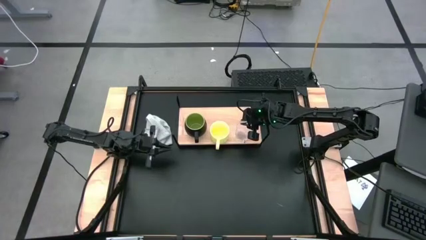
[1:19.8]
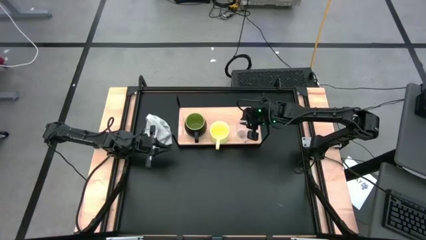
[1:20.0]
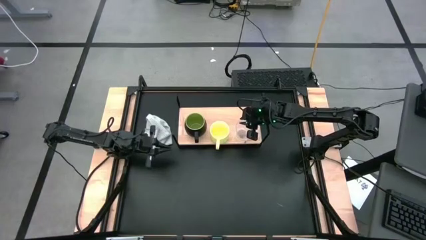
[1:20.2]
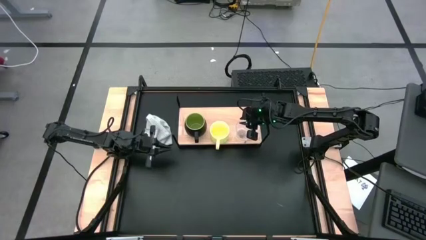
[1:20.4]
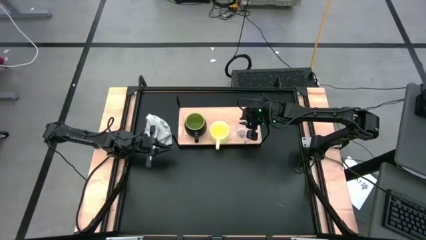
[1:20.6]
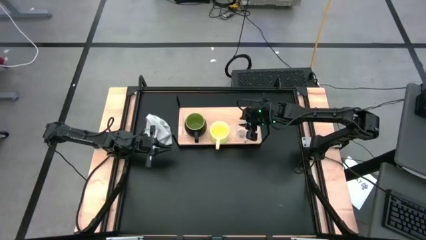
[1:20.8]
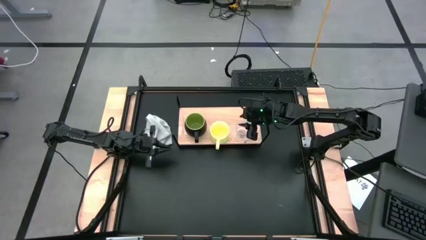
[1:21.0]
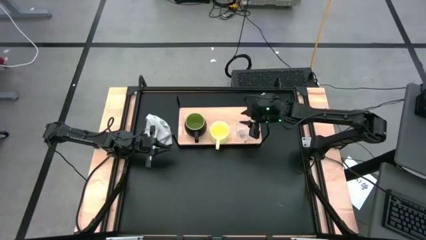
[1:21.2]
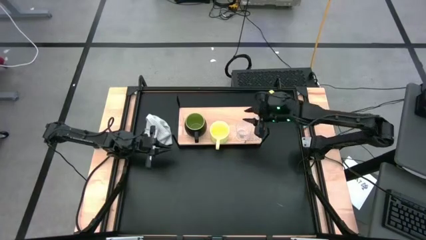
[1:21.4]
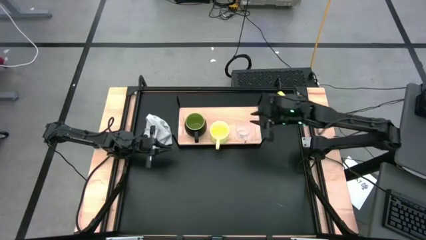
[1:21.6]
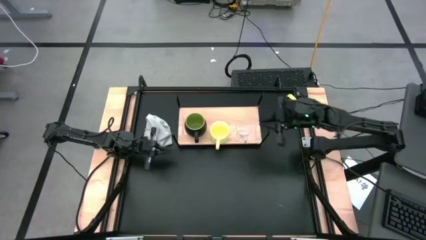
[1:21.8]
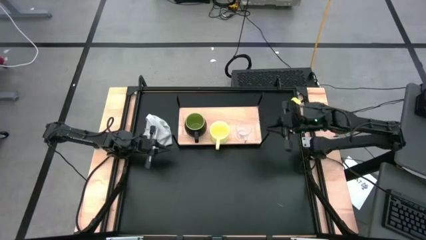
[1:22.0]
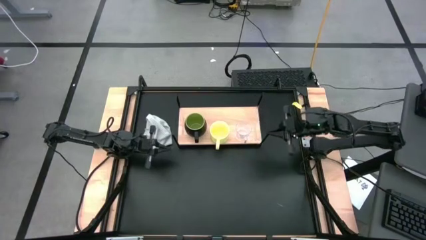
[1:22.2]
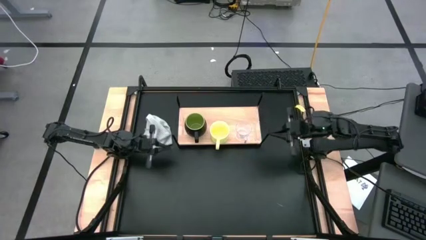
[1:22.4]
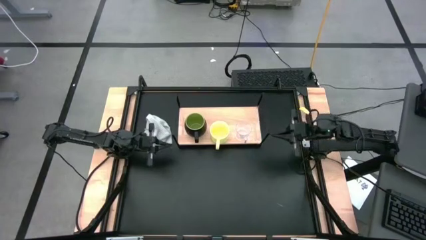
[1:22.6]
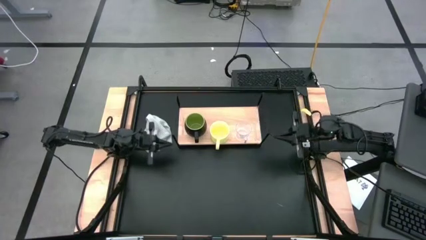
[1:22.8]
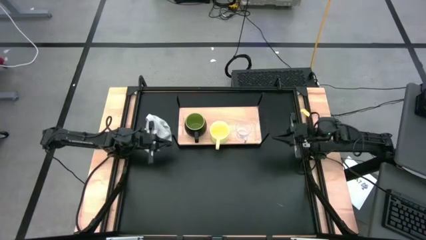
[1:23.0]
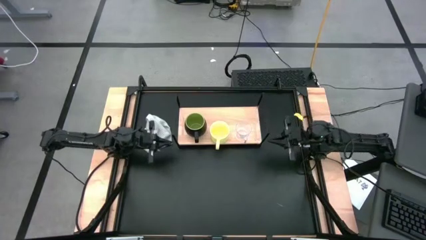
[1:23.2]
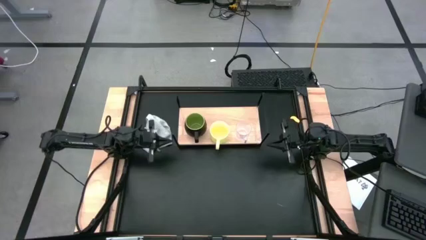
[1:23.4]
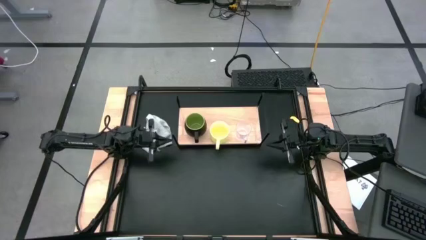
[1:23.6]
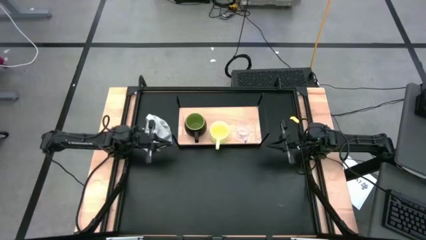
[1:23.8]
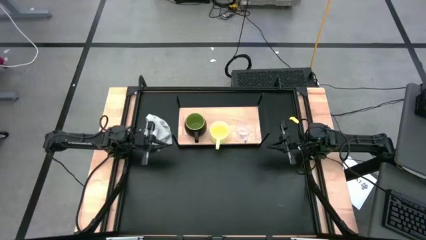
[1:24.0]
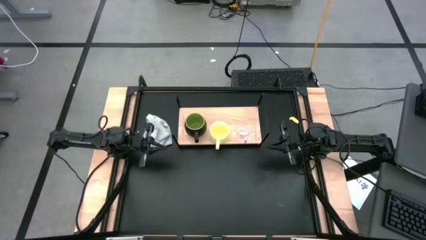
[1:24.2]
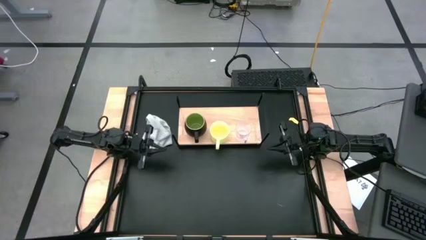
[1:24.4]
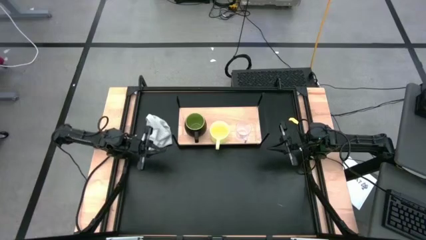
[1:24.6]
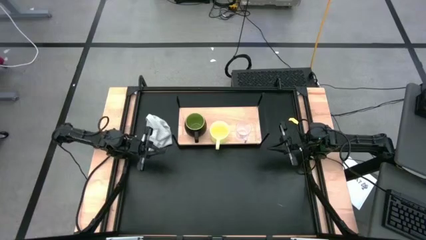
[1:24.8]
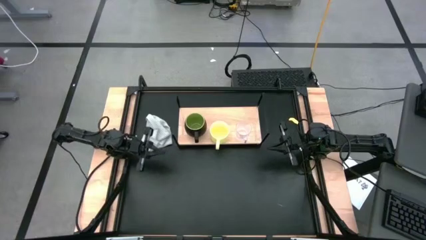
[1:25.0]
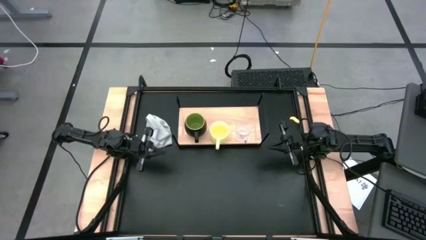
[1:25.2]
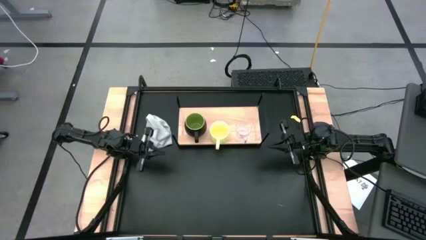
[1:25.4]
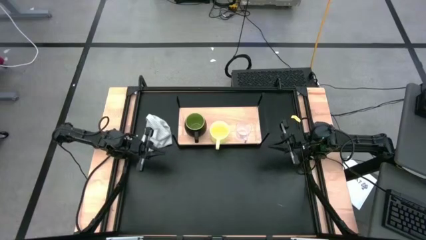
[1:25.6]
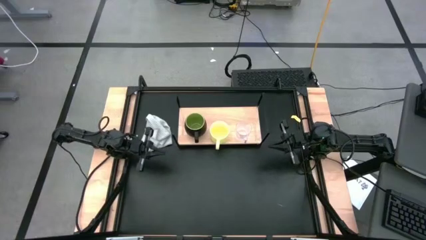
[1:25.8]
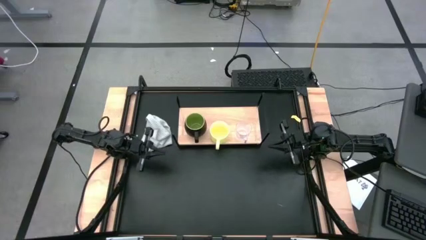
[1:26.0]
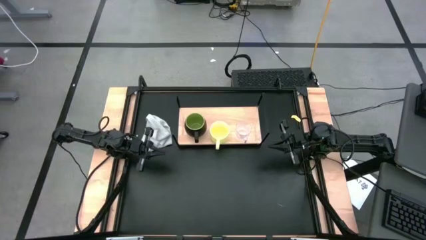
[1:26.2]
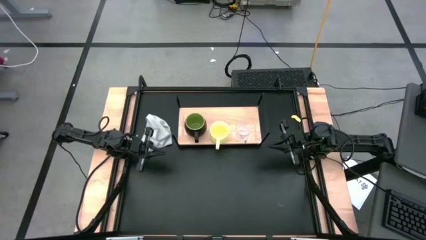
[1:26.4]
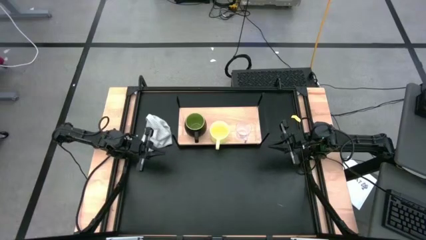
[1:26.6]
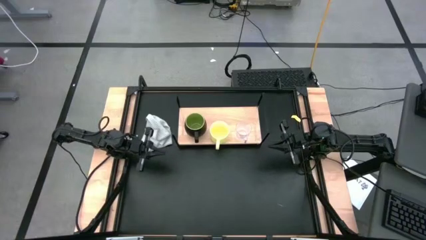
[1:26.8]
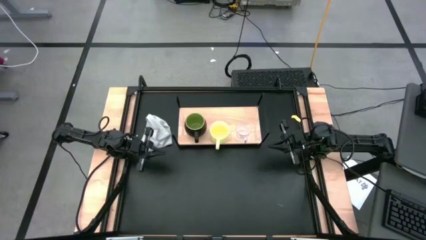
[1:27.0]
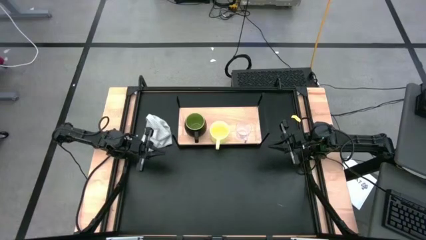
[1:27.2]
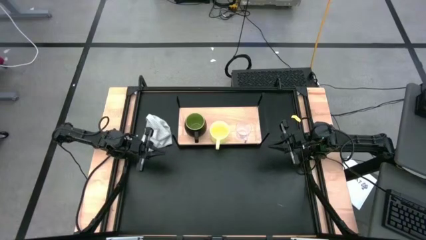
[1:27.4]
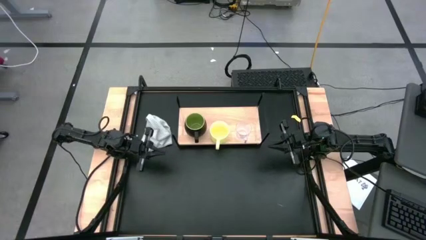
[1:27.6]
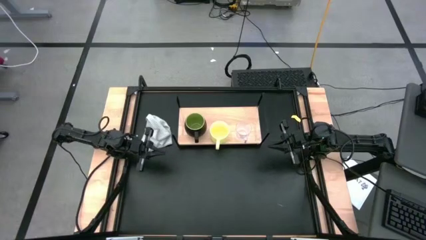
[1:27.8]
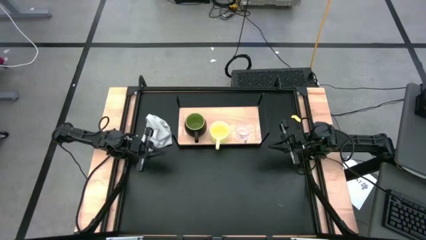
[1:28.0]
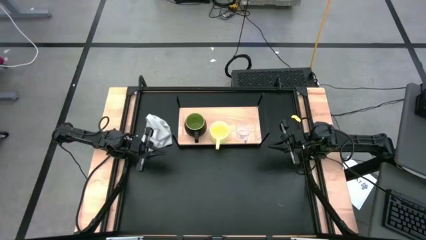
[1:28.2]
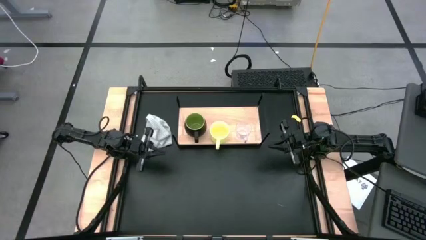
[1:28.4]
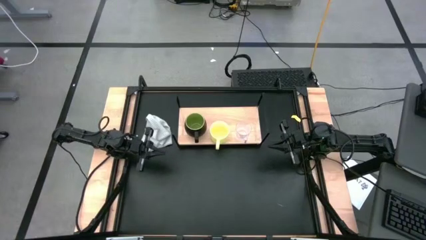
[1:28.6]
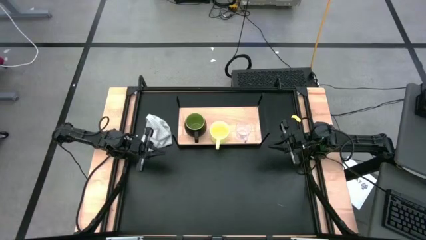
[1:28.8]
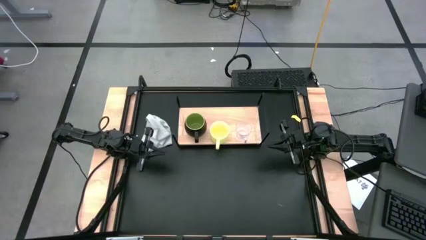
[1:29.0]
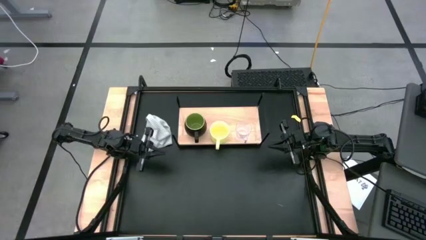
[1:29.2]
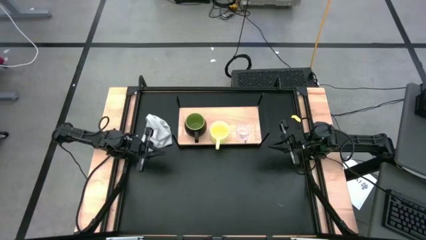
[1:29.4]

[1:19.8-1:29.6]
Task: Stack small to large cups/mugs on shelf
Return to Home Position

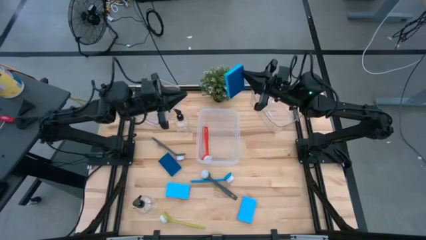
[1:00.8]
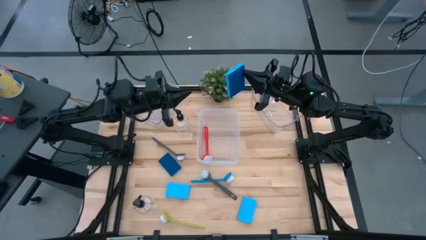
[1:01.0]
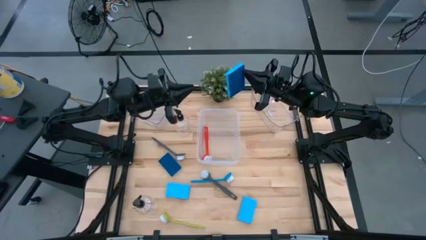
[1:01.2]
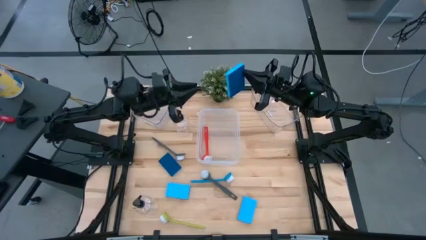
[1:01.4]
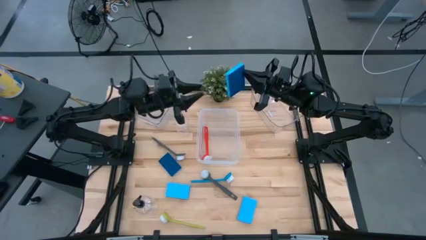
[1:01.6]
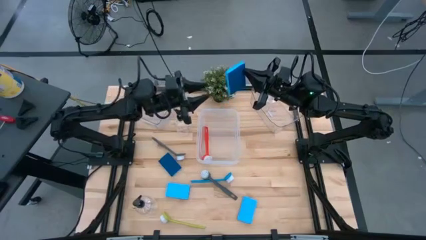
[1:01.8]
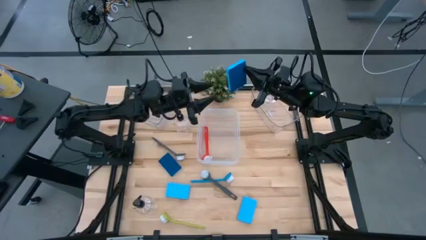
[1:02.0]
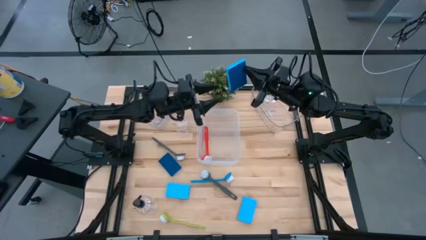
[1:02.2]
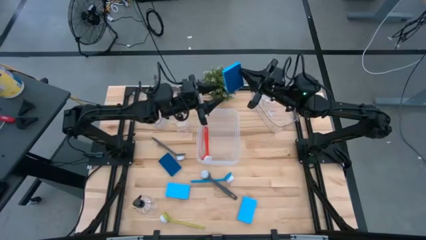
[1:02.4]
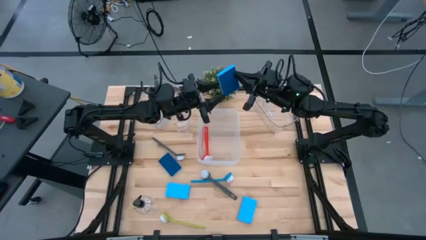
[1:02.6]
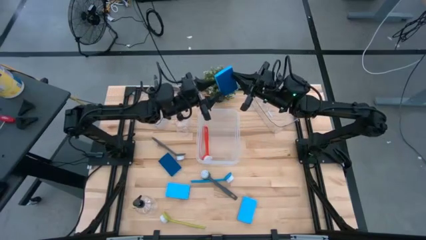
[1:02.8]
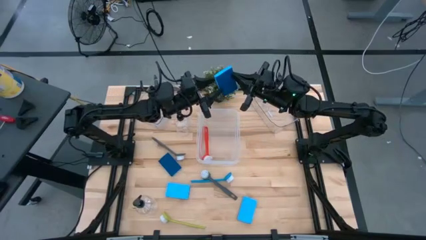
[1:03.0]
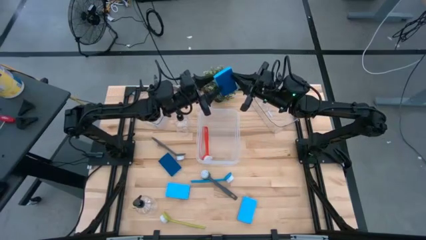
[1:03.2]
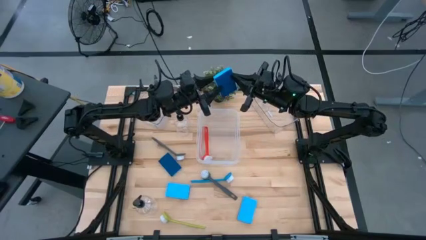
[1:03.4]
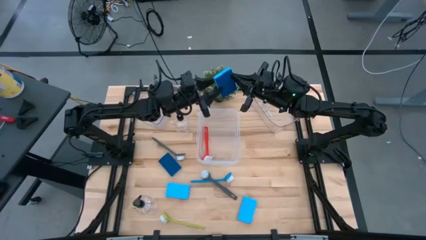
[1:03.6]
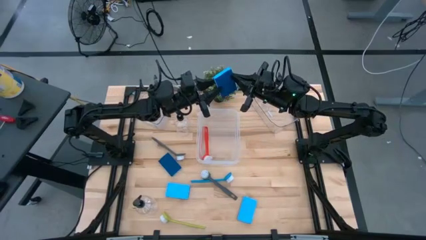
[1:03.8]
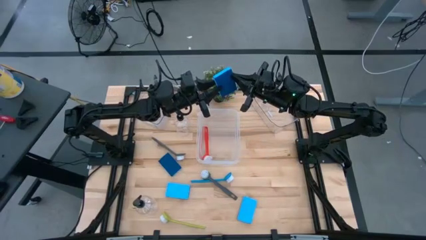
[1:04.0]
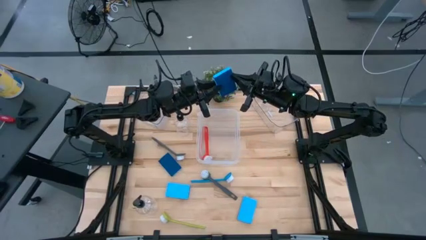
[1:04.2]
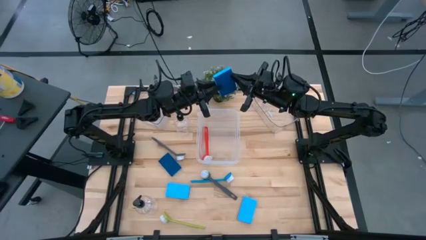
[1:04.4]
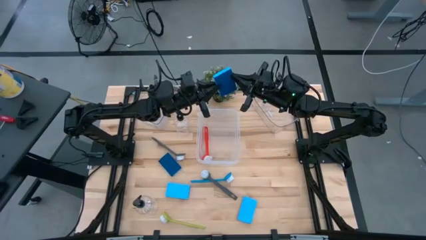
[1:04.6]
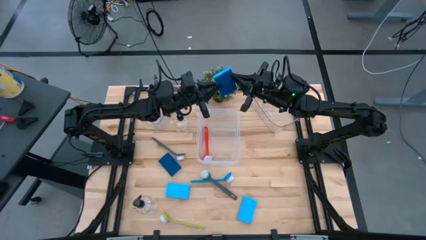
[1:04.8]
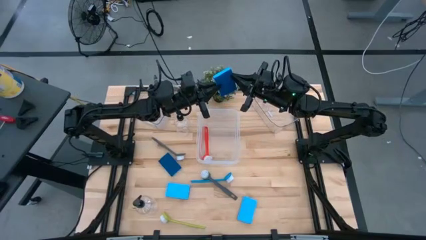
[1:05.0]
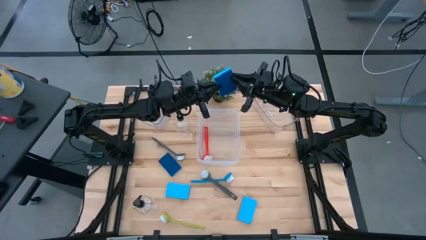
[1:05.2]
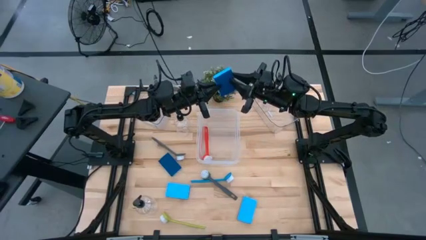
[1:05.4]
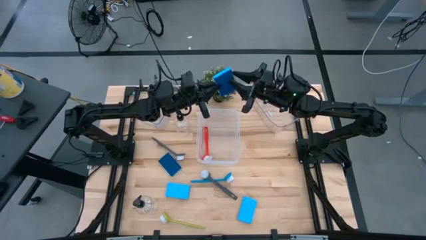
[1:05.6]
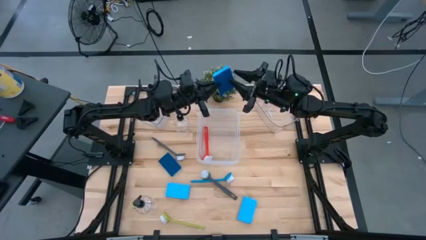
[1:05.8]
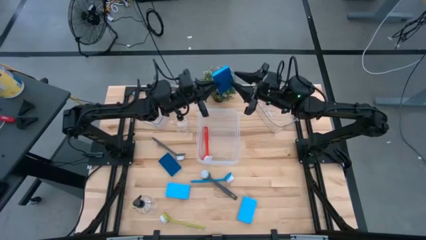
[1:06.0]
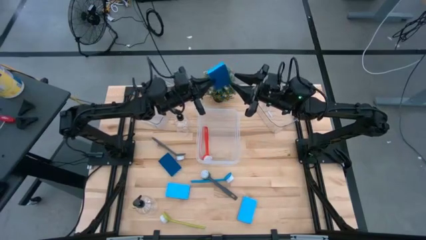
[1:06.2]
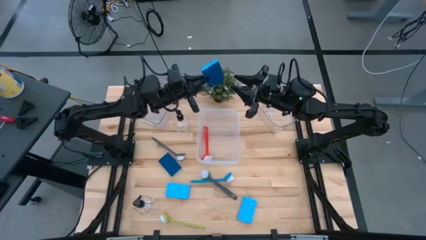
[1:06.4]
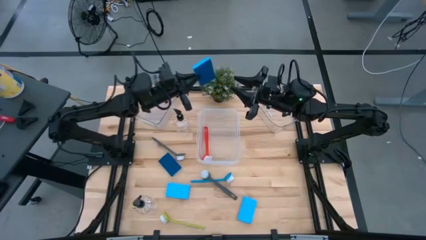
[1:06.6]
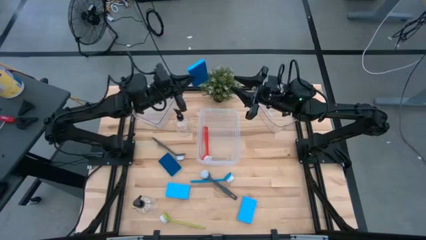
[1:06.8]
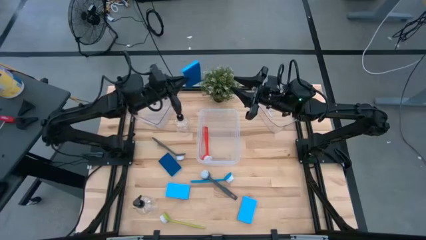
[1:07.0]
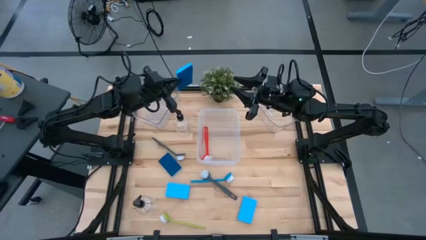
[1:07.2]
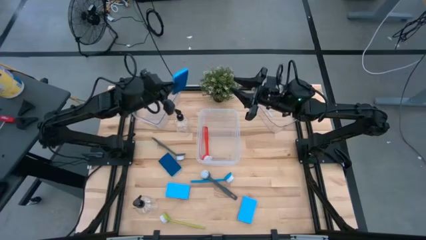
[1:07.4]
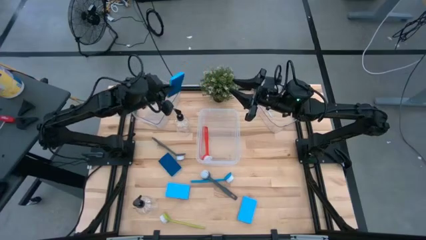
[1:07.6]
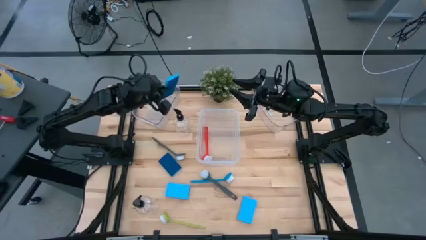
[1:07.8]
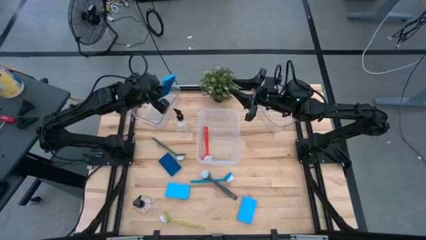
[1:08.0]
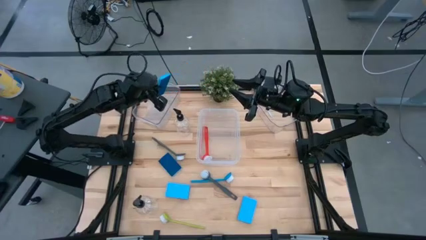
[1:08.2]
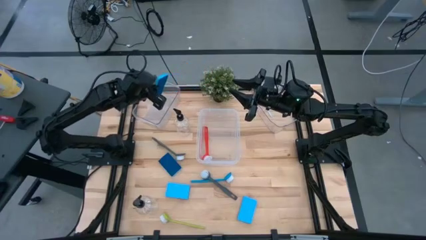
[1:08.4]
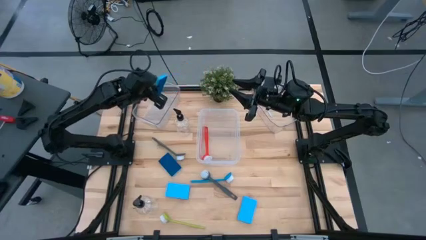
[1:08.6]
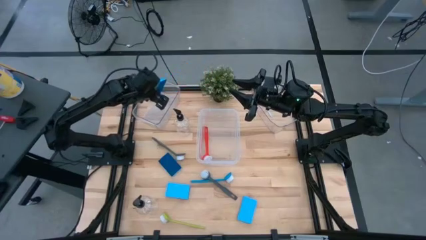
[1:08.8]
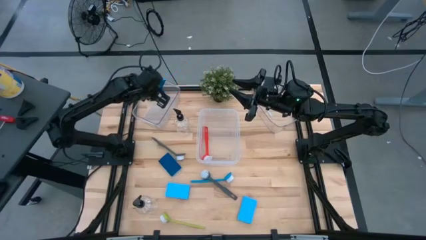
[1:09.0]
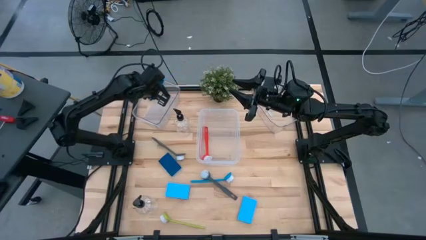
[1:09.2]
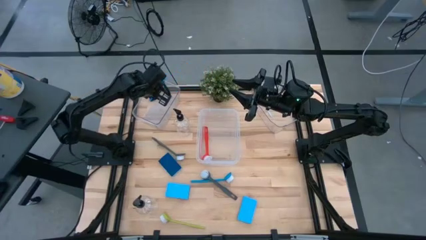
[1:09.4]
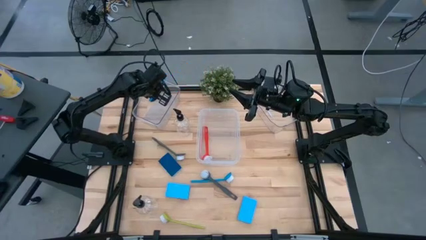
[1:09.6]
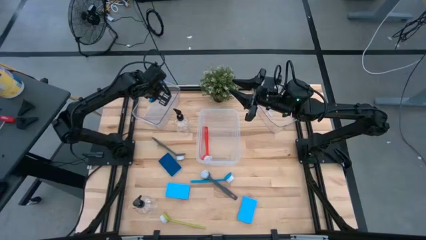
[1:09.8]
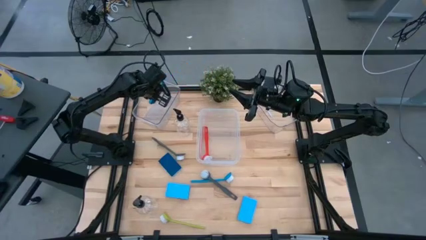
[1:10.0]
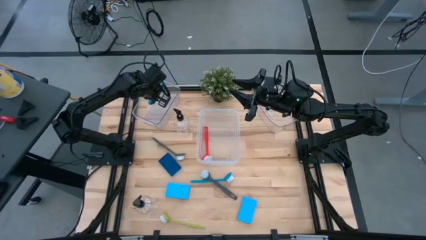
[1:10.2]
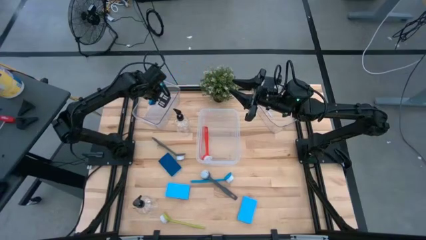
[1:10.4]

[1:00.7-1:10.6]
Task: Pick & Place Kitchen Sink Supplies
Put the blue sponge in the left transparent bin
